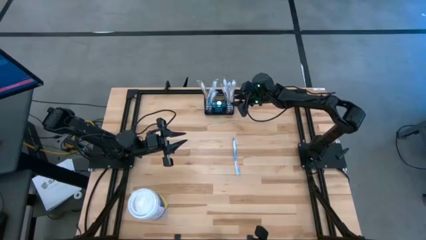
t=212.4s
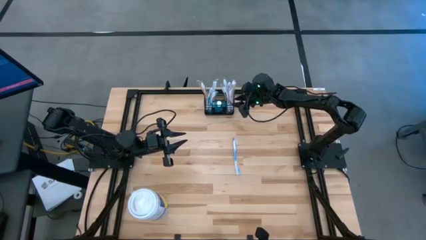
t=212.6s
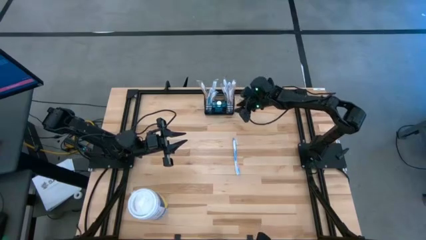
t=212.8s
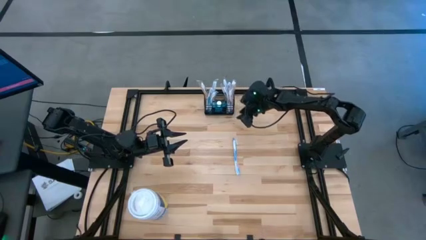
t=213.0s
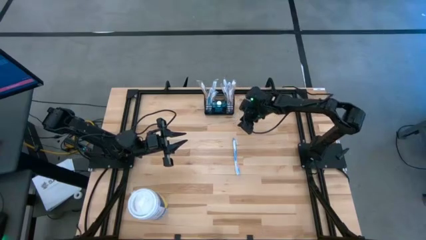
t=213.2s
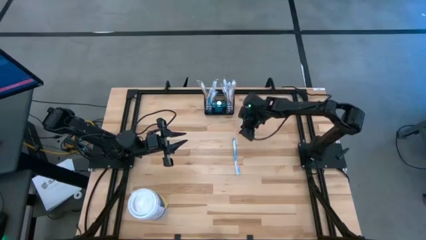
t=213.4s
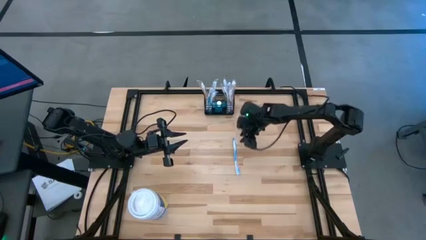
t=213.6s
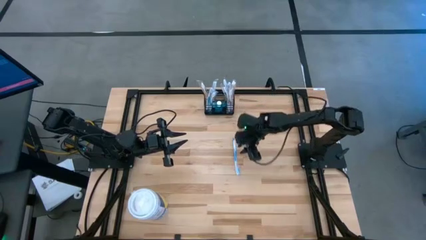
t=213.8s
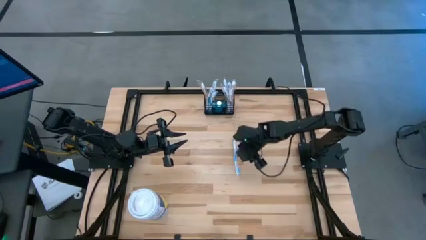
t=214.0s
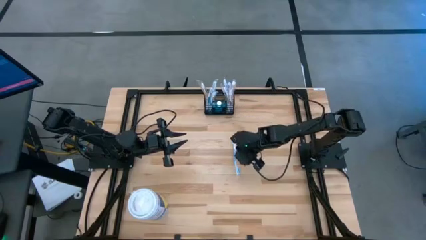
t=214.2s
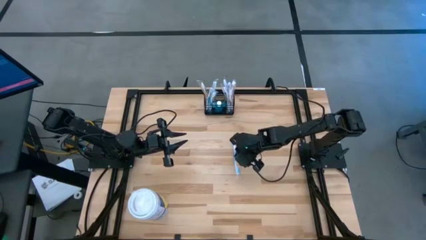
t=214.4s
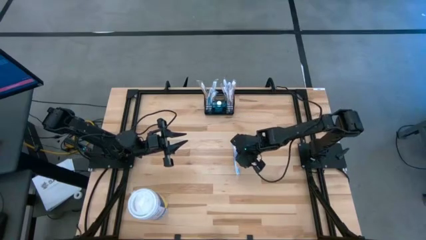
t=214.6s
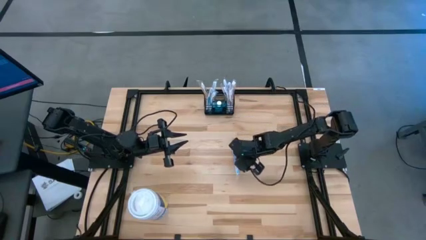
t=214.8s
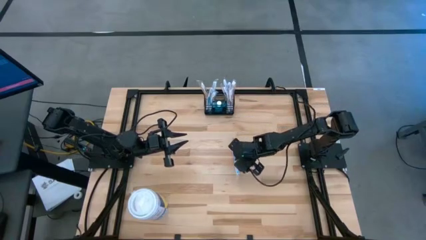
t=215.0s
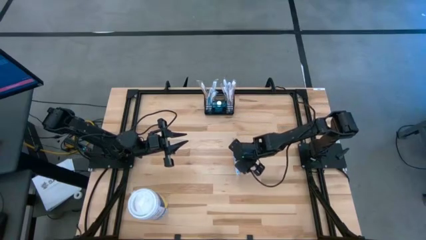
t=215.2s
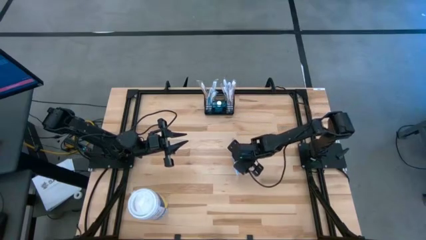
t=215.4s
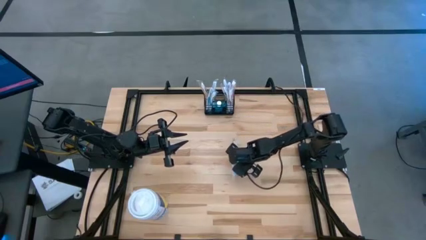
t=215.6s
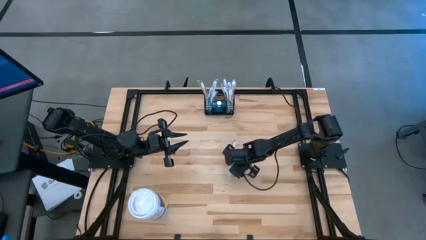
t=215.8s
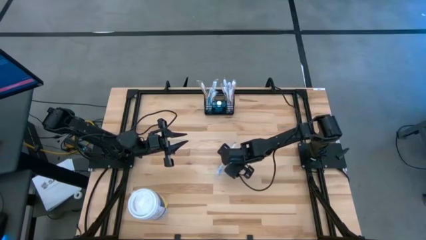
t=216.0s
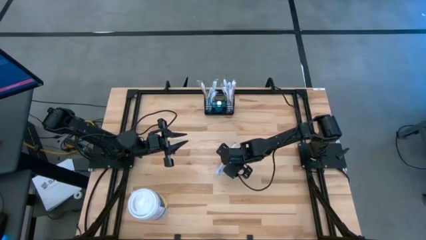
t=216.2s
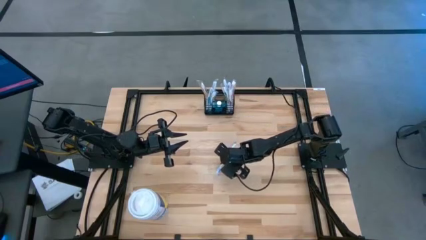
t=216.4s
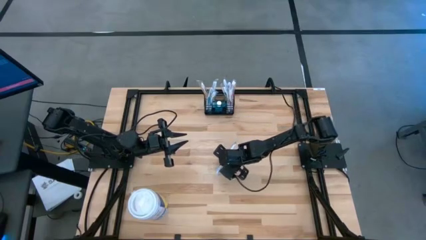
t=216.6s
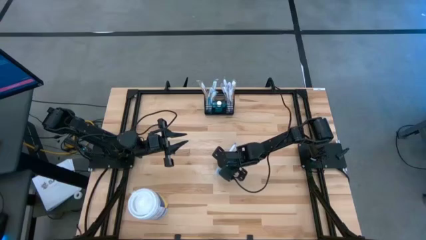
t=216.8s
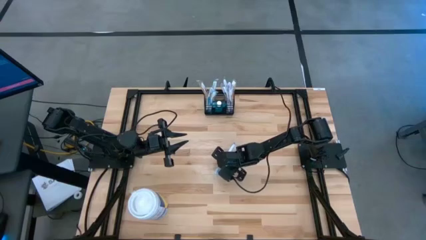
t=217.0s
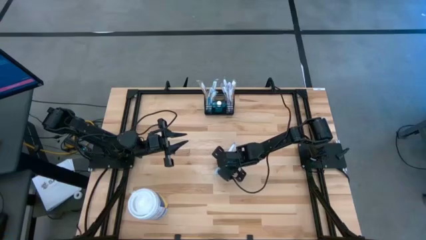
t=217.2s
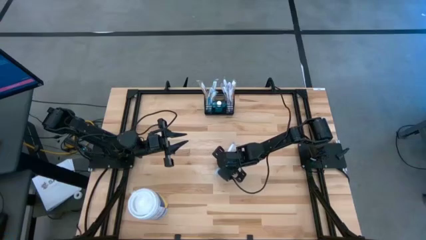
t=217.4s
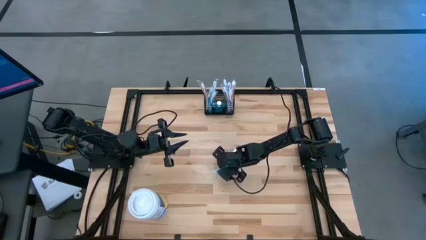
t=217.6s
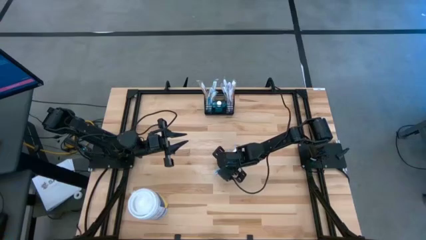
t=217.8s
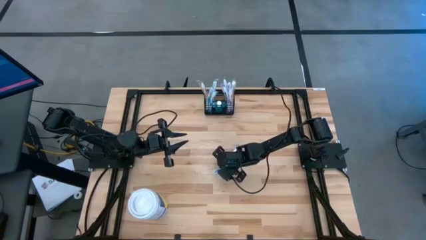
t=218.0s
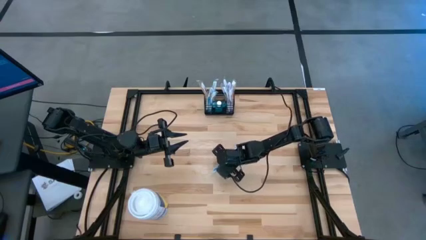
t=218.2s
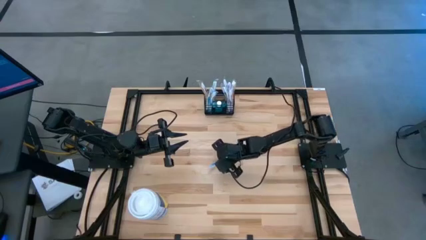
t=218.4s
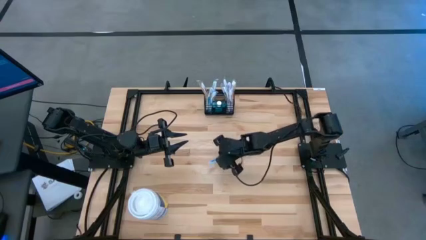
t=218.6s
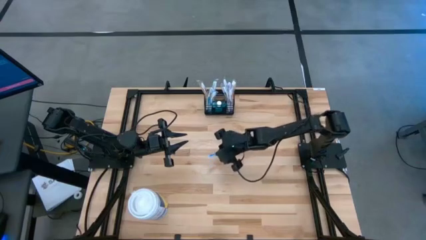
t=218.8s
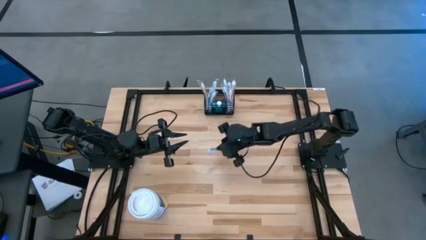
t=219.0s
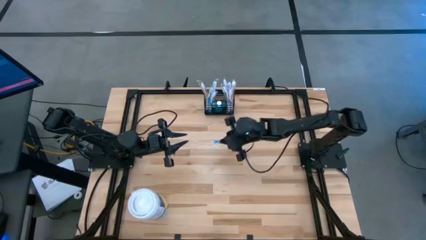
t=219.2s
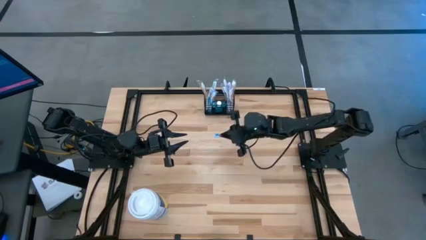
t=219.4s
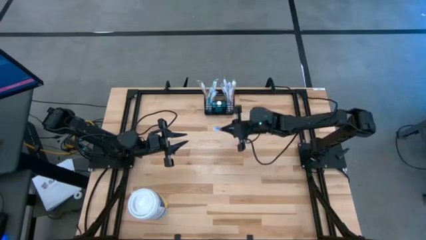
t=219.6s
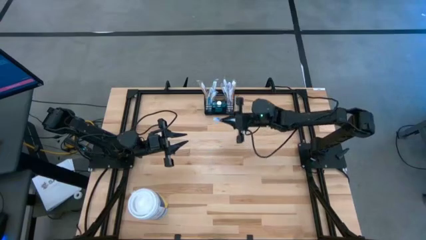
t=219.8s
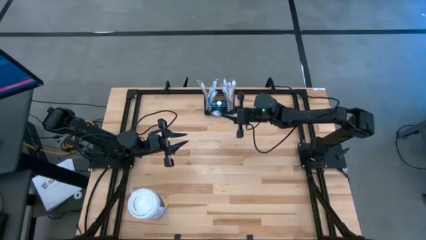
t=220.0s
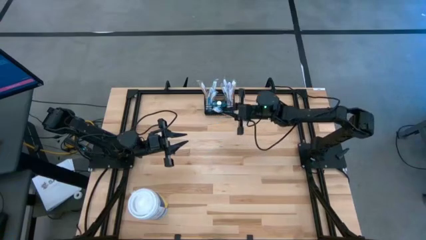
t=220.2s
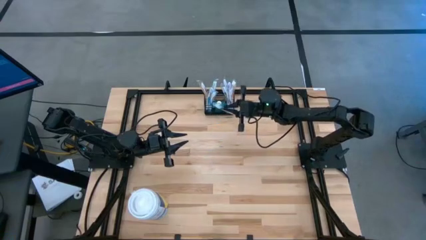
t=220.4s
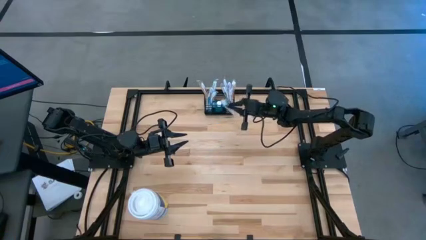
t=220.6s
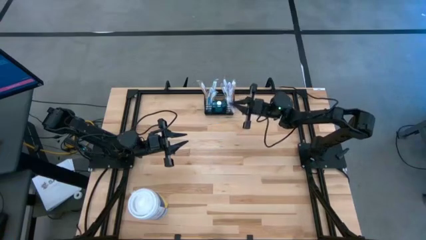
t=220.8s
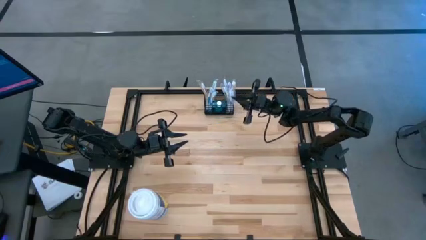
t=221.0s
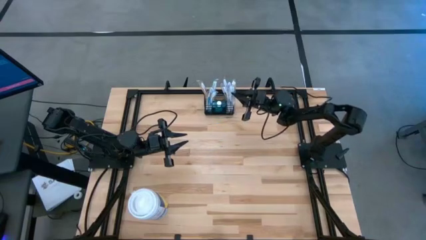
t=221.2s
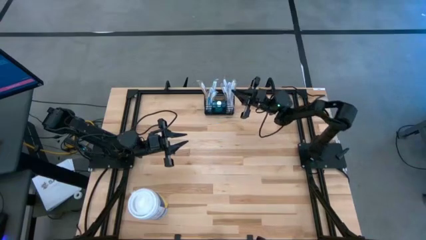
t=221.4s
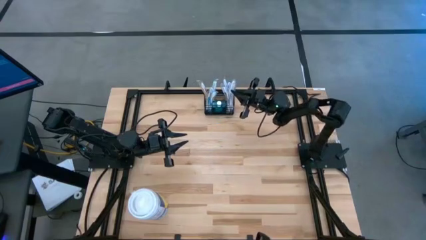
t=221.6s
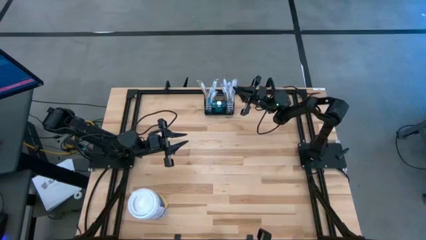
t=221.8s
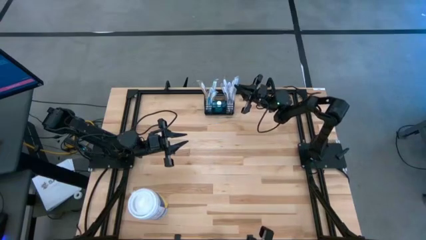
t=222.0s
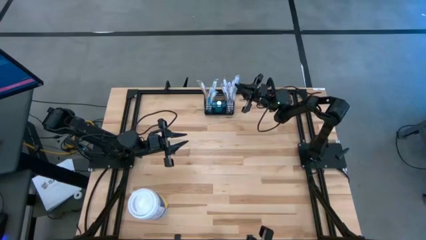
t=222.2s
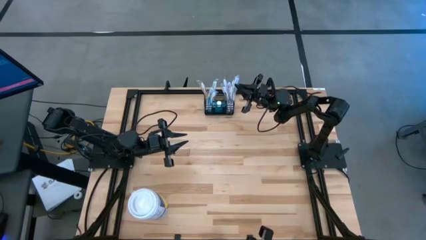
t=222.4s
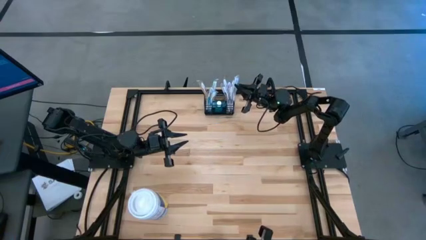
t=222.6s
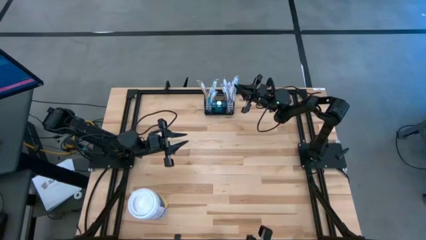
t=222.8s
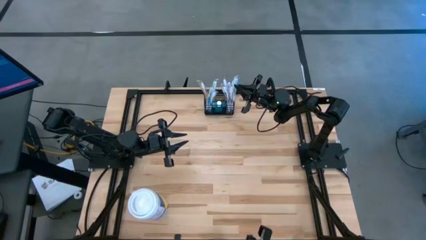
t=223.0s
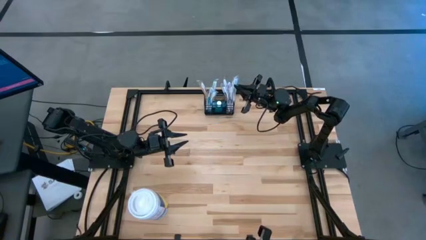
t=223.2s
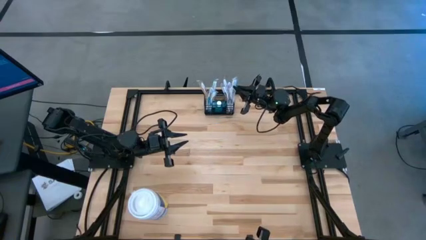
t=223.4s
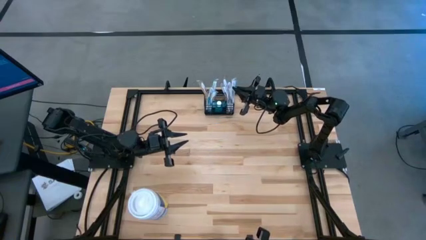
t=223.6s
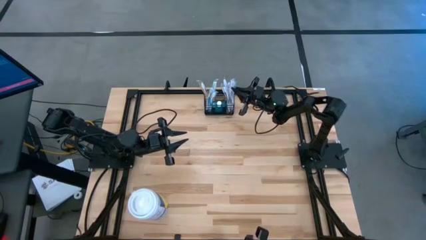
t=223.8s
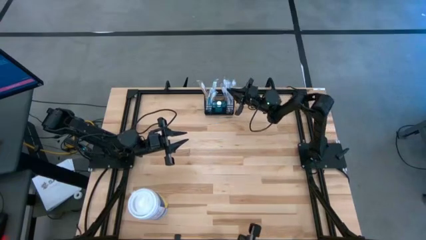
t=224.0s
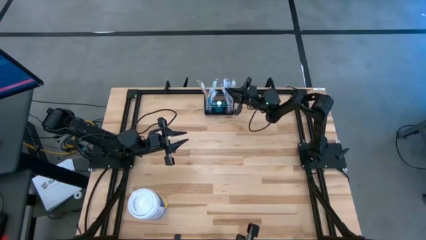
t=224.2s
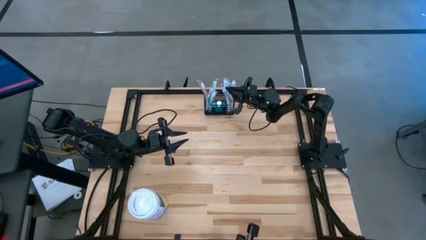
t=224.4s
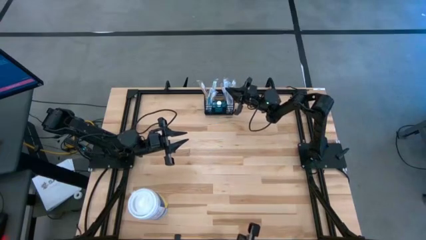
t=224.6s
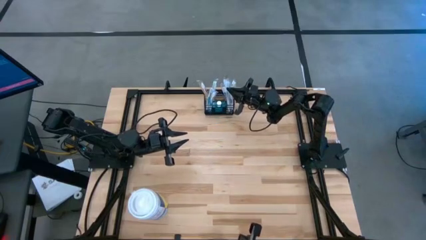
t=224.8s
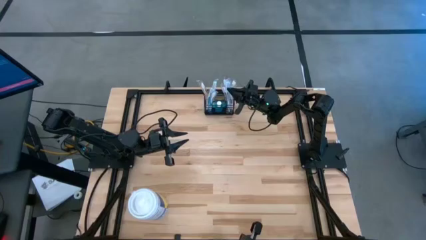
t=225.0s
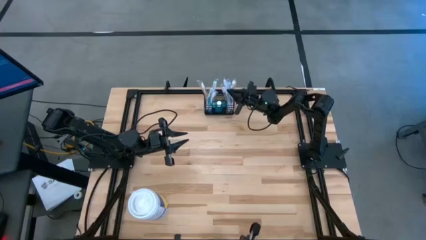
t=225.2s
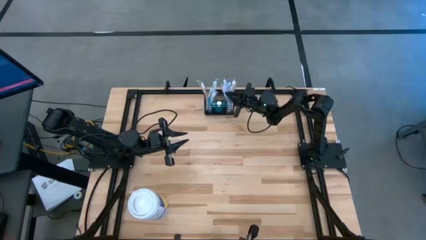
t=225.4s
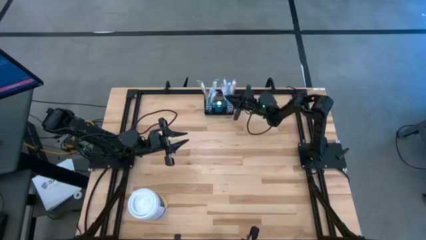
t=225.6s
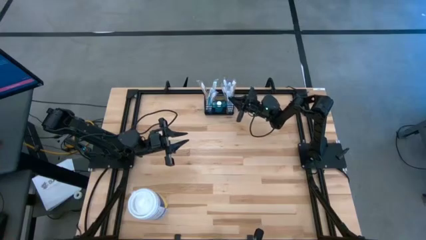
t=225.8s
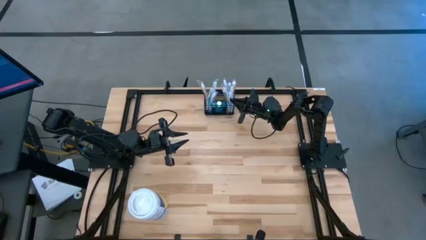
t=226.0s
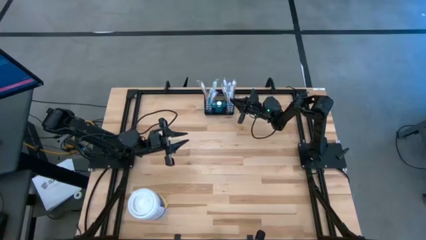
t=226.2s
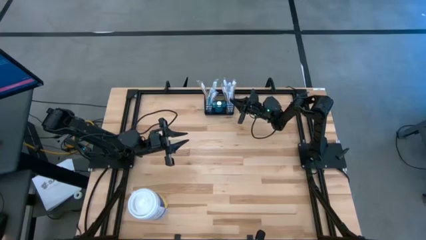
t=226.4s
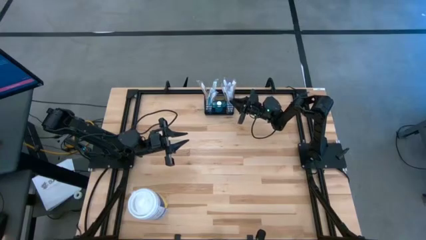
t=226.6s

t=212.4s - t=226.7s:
Task: Pick & Place toothbrushing station
Put the blue toothbrush into the mesh organizer

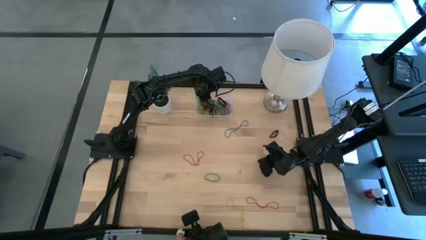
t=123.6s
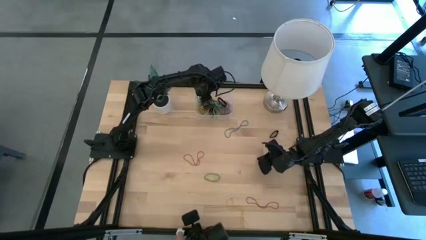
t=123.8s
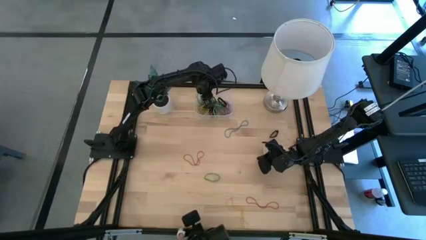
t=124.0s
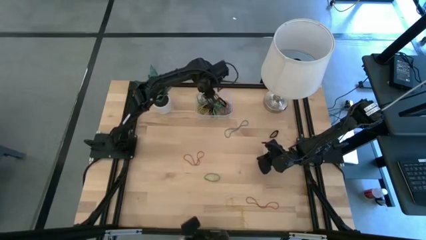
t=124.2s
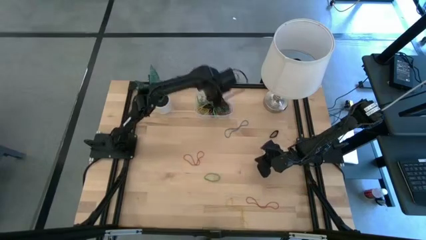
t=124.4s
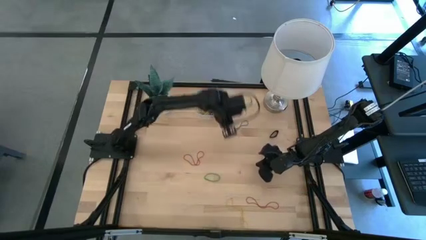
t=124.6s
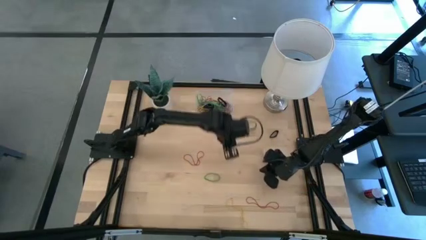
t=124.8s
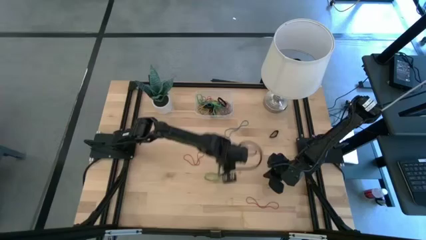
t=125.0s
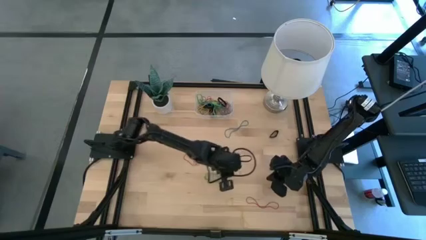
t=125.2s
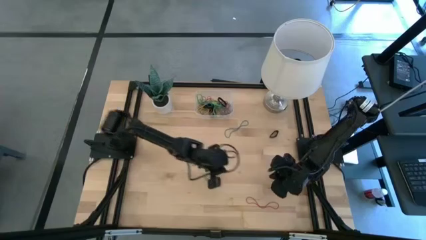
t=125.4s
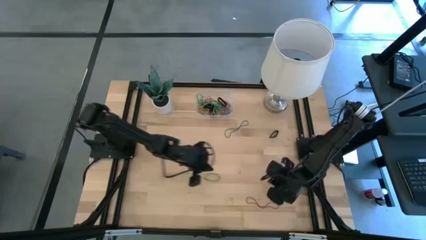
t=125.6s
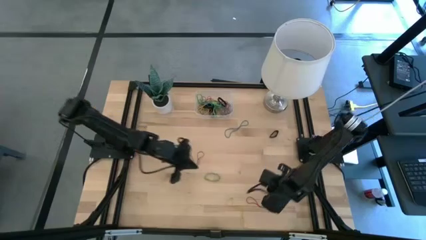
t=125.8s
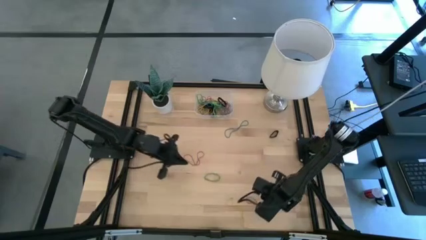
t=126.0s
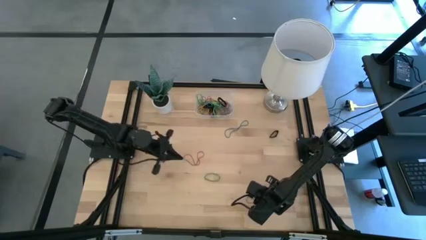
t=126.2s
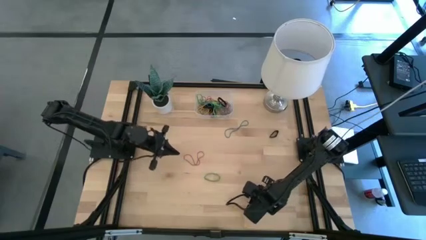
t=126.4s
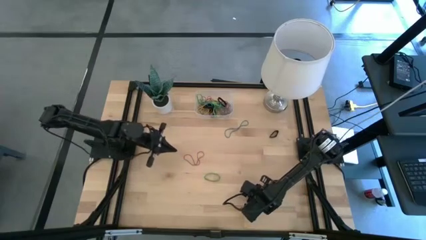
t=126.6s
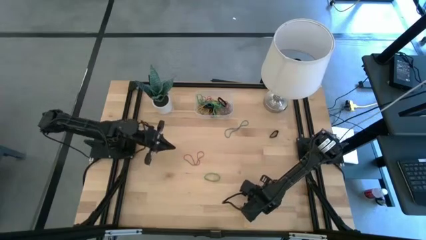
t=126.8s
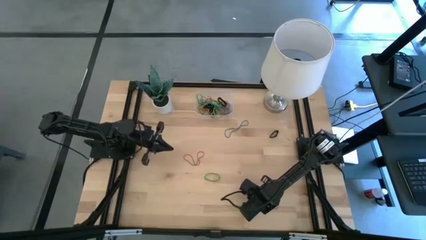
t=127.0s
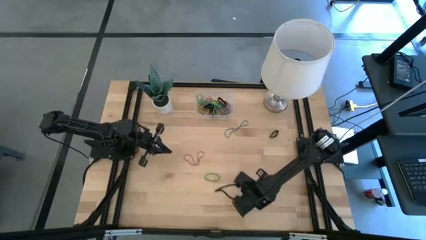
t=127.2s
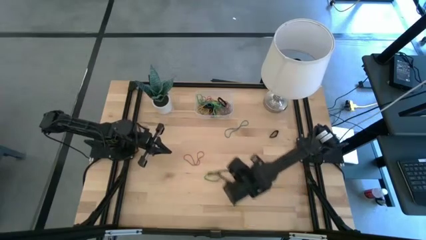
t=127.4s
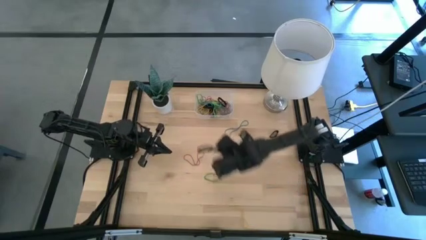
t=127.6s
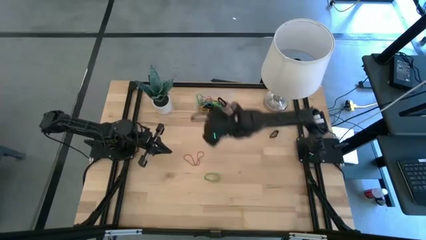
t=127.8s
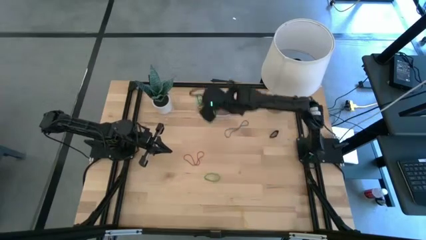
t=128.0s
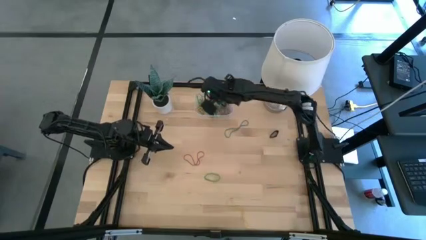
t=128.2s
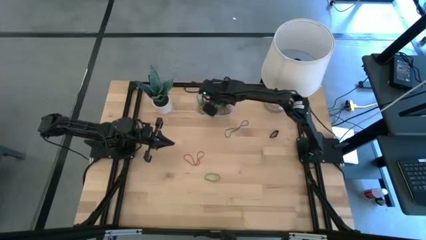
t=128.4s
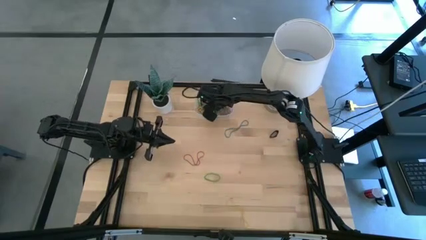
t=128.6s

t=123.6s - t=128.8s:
Task: Pick and place rubber bands into bin
Put the red rubber band into the transparent bin
